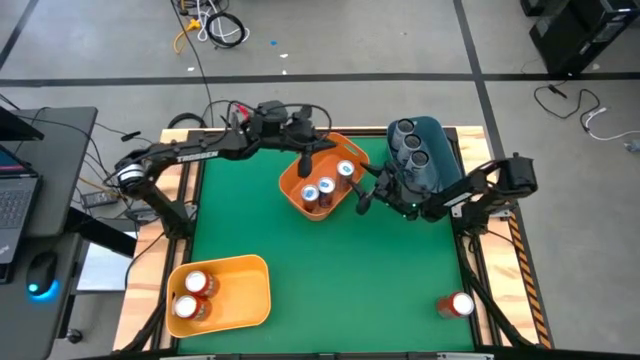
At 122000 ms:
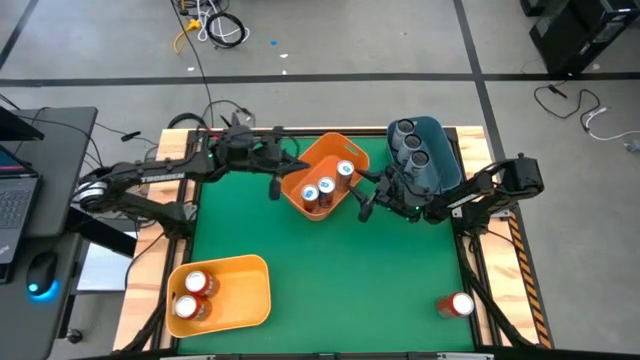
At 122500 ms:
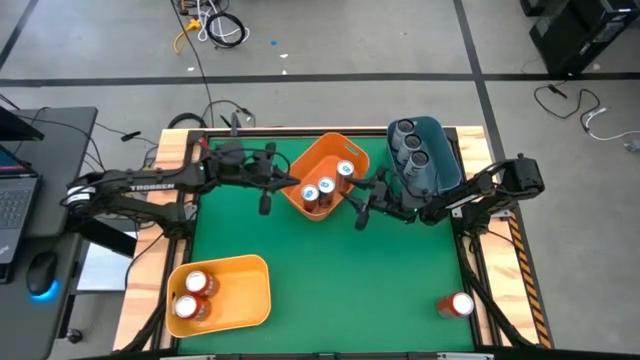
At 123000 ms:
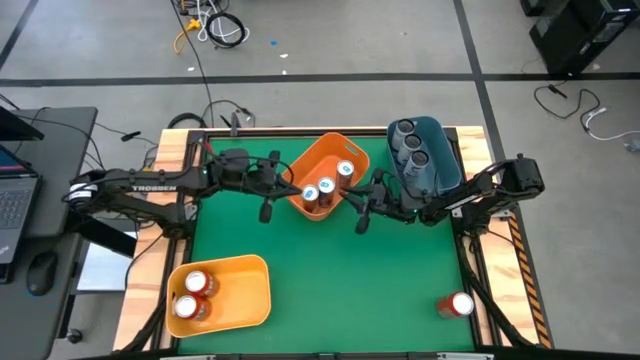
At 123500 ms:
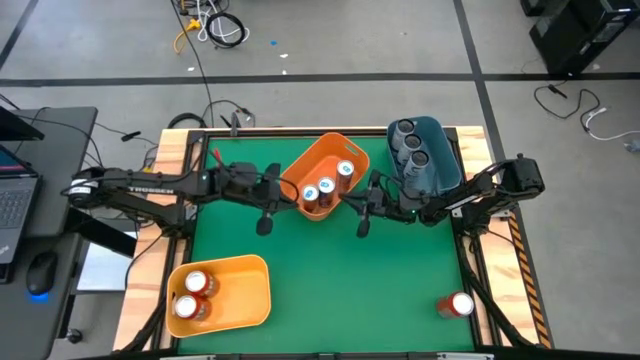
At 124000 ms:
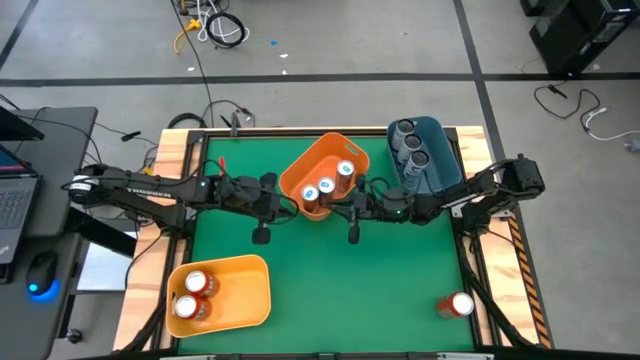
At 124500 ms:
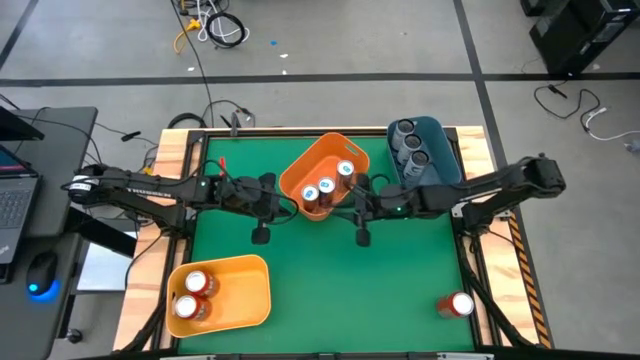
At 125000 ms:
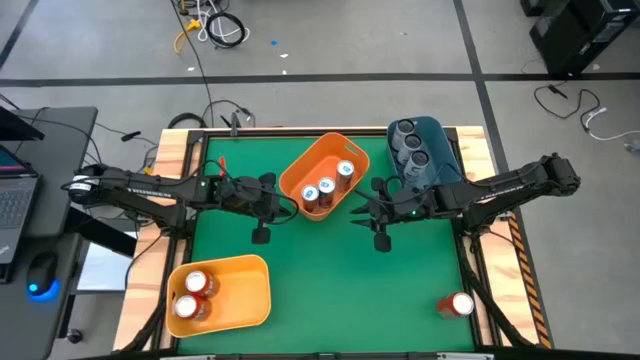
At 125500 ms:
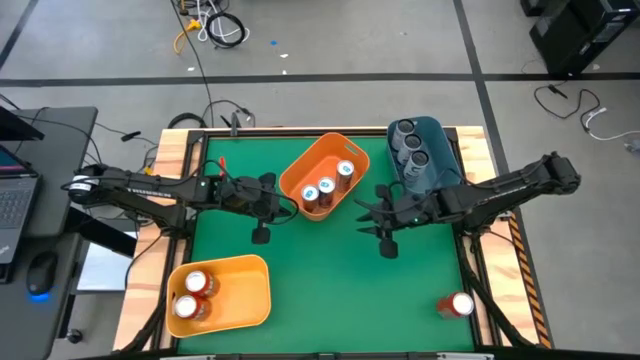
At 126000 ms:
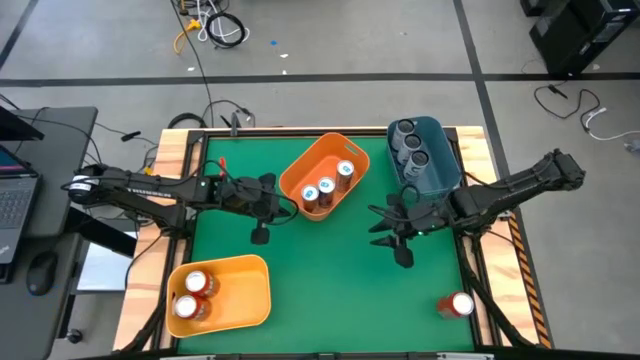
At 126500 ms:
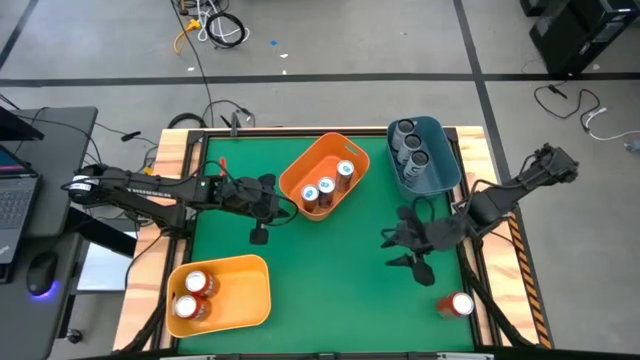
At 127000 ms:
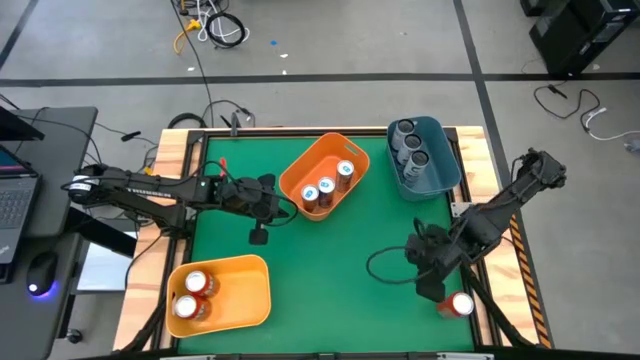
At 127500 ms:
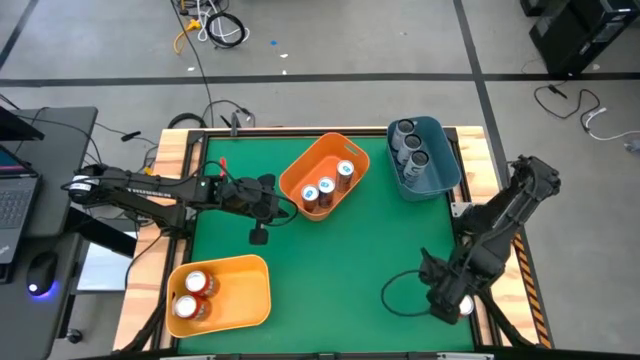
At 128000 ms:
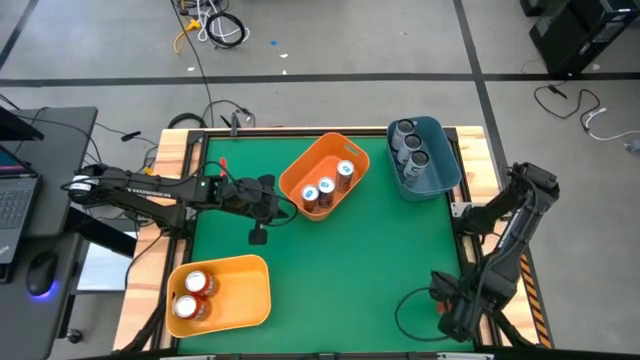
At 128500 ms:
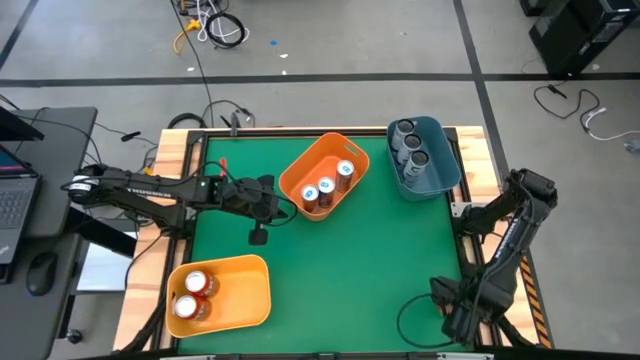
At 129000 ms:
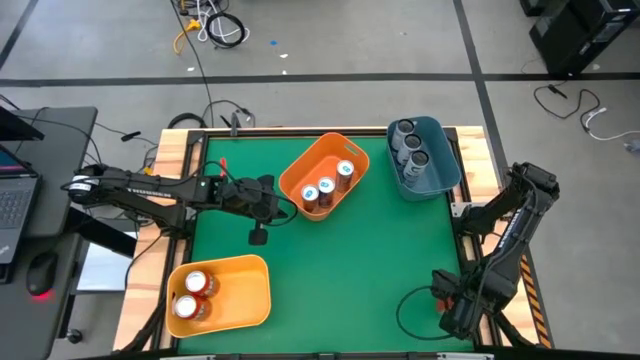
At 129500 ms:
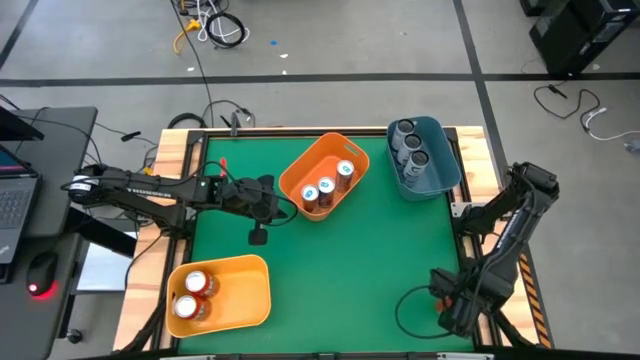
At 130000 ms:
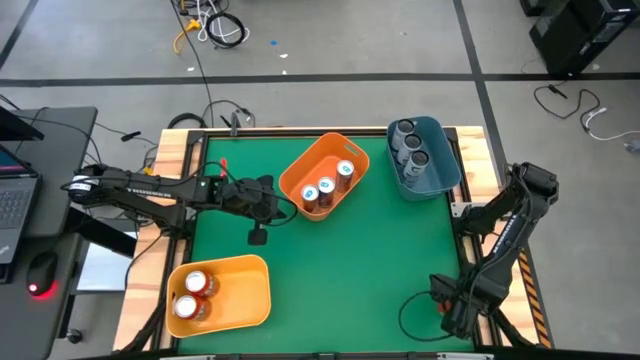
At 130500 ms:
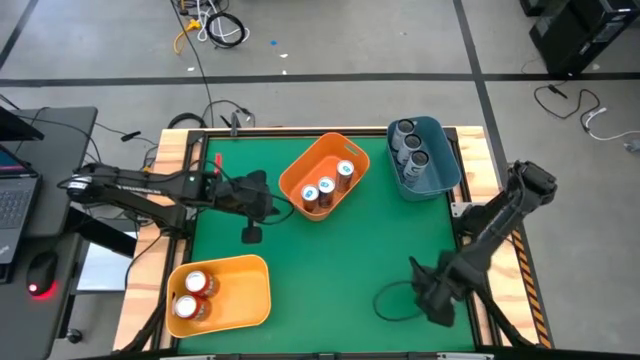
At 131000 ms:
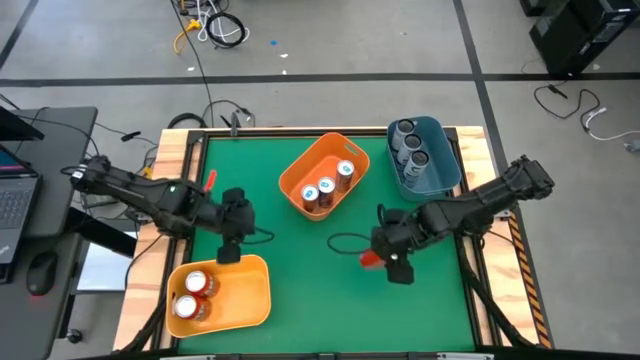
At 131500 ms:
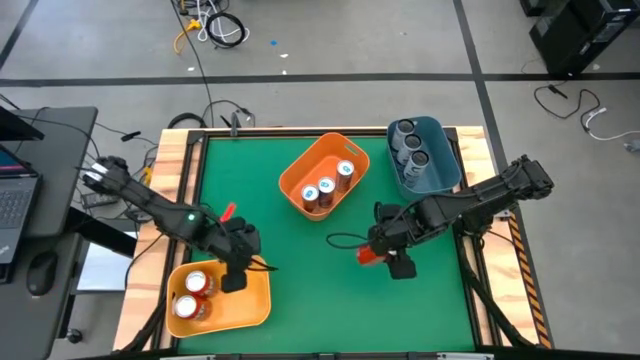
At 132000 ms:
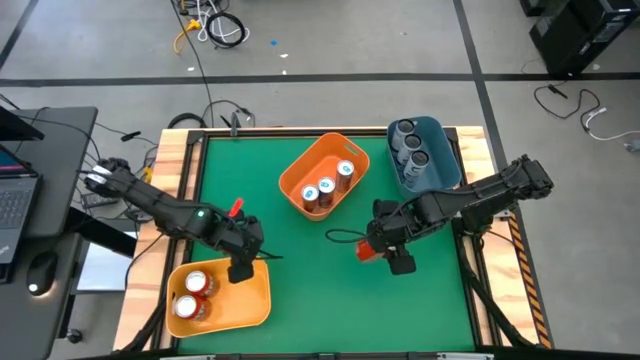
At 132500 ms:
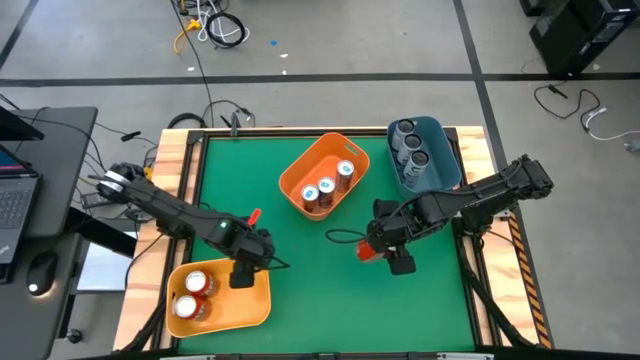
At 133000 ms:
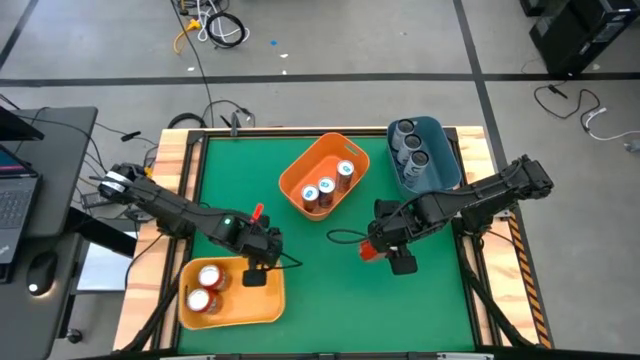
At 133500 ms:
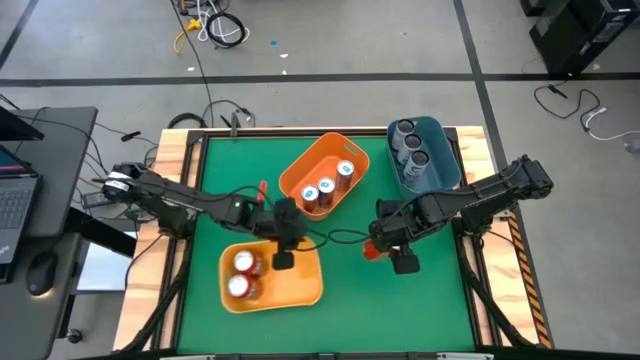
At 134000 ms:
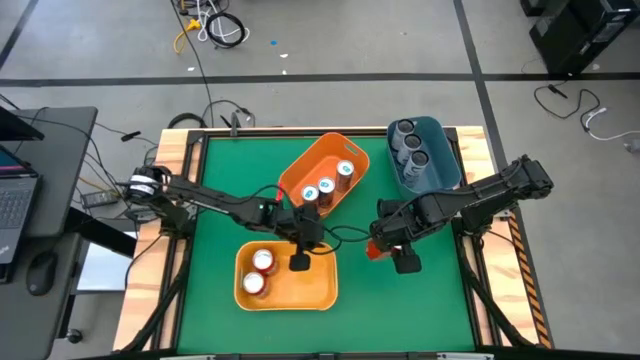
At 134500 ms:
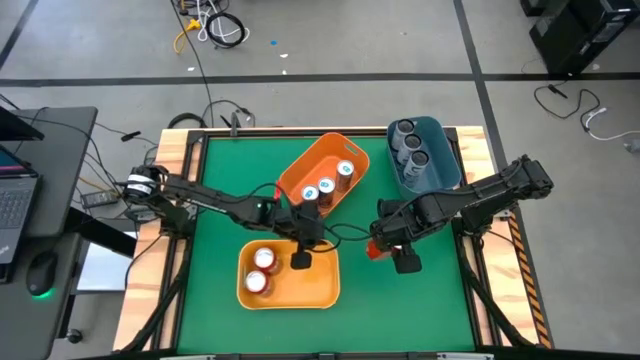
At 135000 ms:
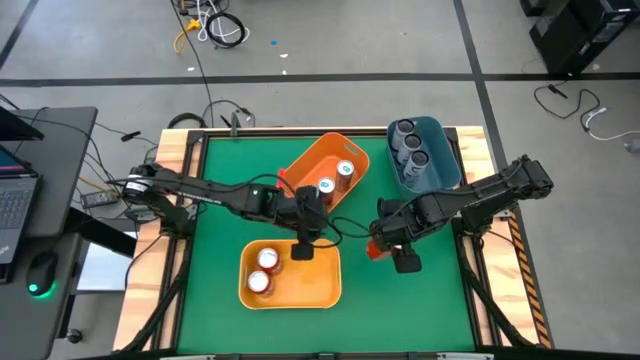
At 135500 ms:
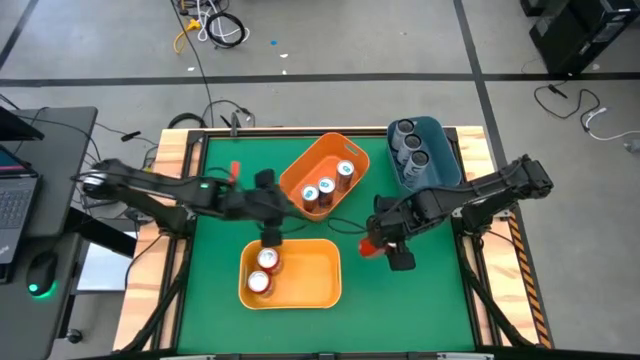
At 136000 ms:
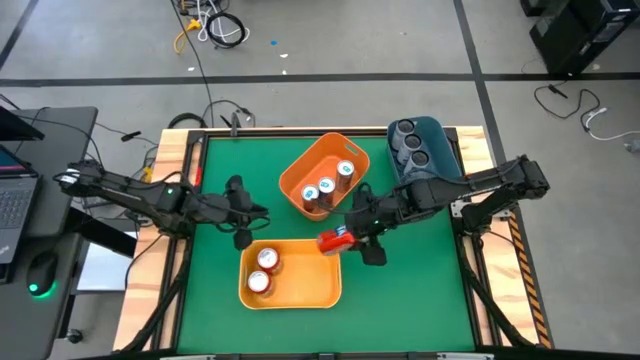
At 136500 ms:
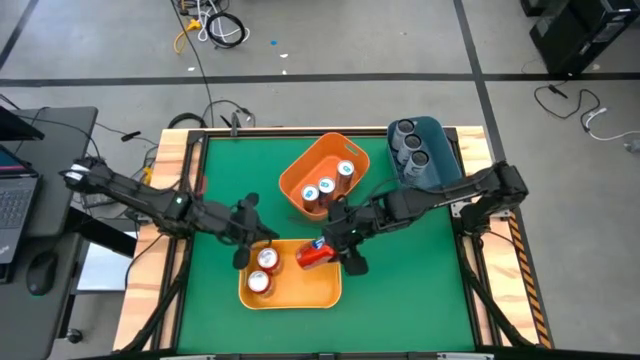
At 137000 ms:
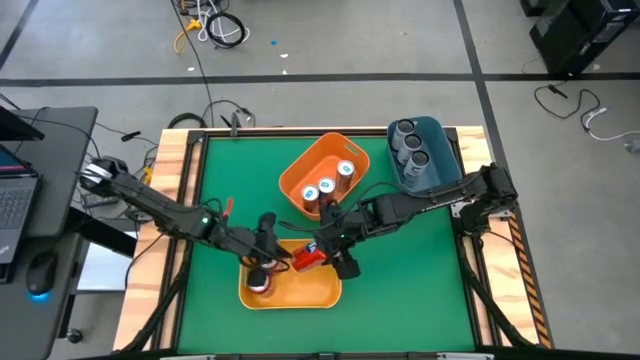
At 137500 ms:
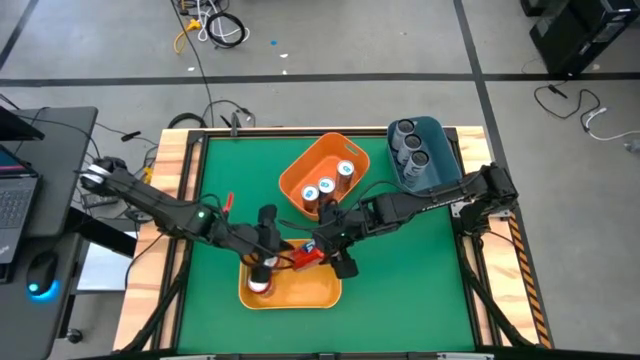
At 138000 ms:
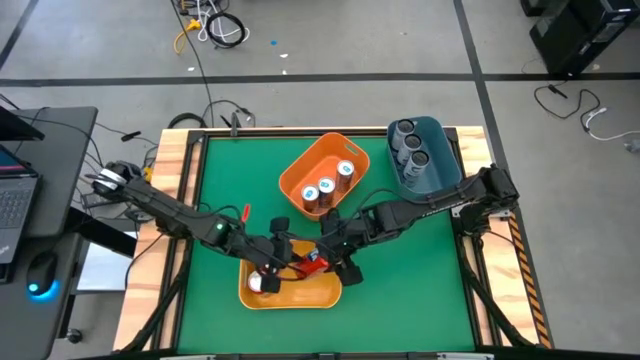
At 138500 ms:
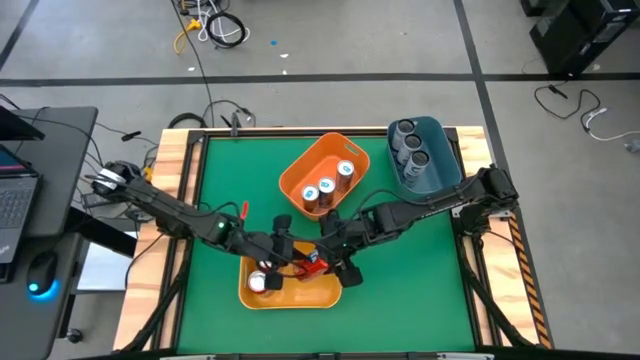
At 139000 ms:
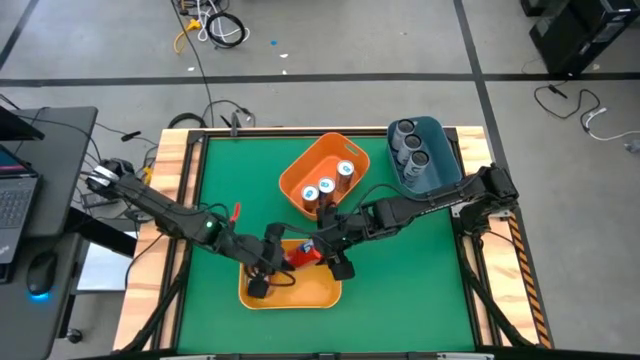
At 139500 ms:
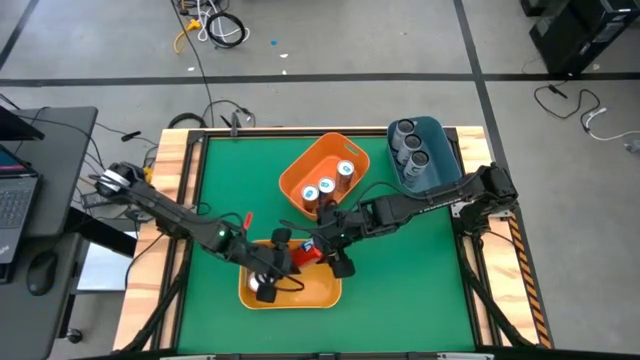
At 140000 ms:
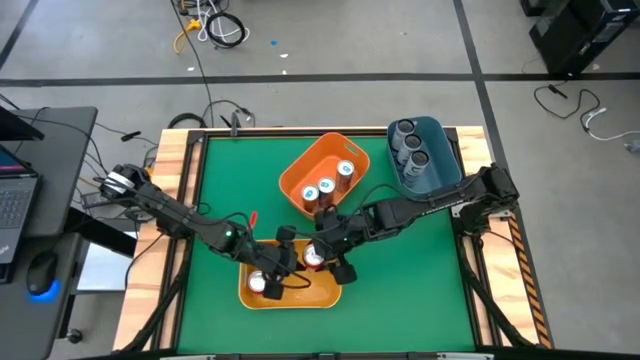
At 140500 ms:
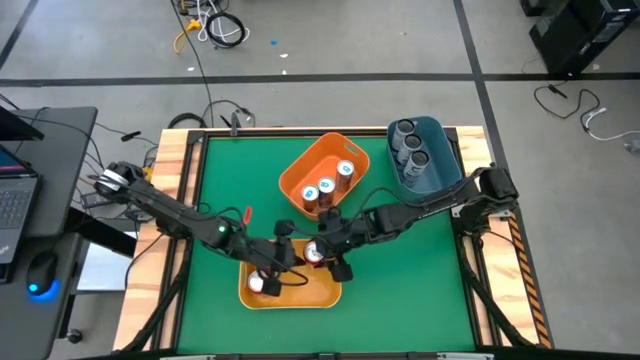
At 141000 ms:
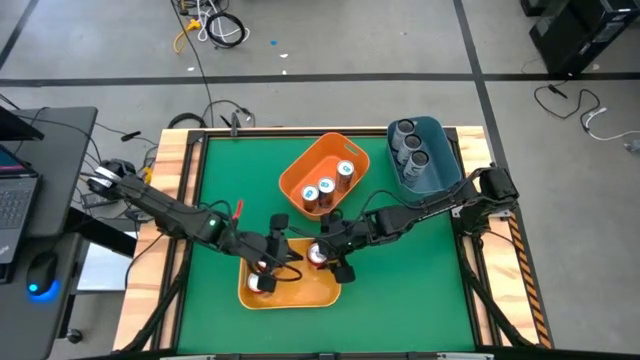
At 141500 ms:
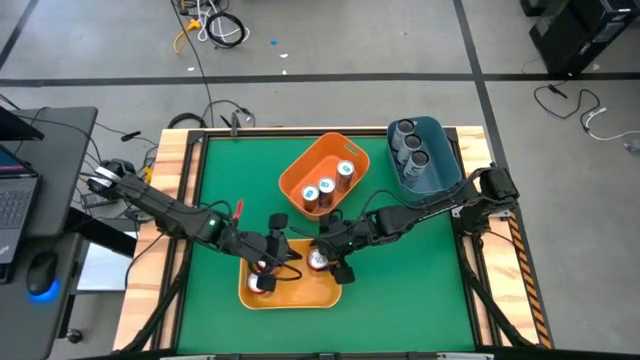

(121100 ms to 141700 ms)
Task: Sort soda cans
Put the orange soda can into the yellow bin

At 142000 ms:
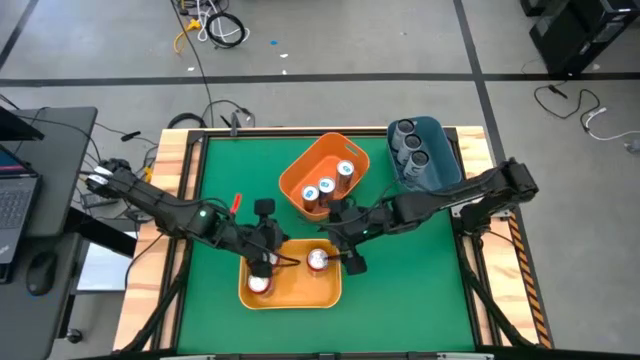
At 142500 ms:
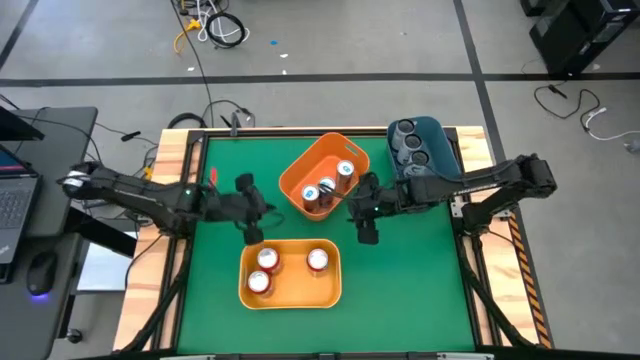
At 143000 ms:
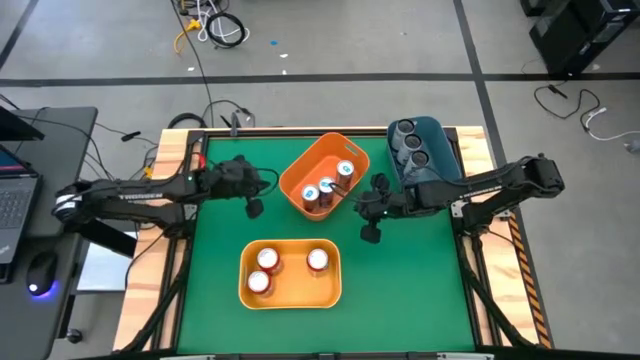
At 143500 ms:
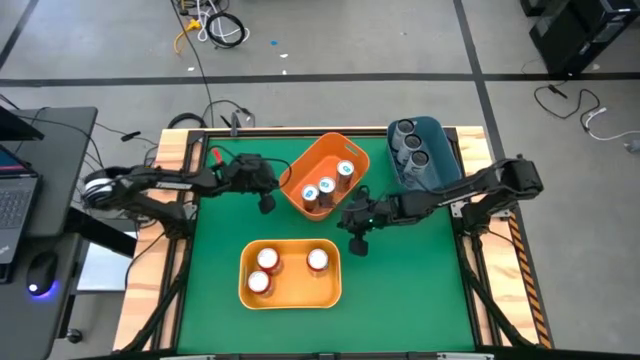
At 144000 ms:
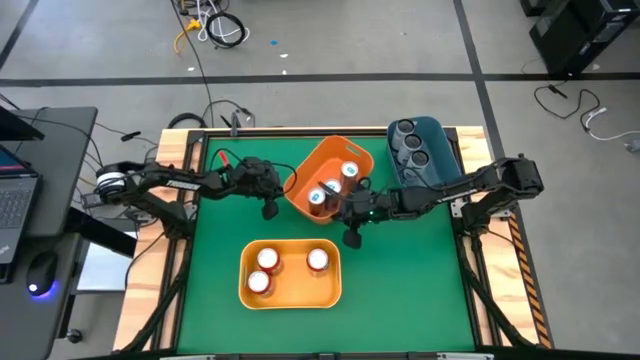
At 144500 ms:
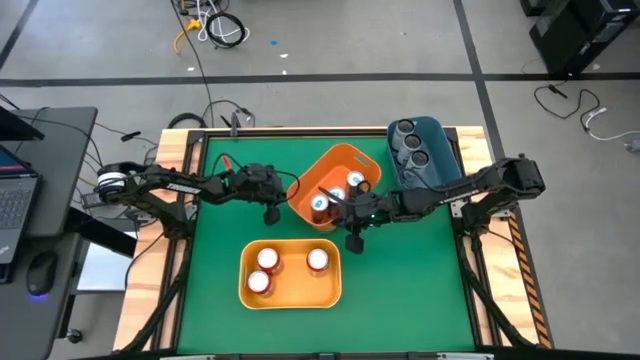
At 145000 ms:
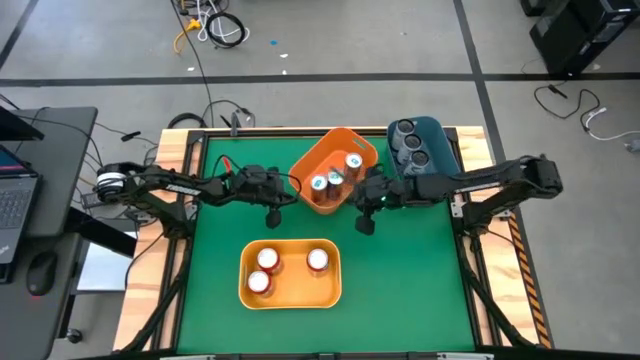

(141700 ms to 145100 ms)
Move the orange bin beside the blue bin
